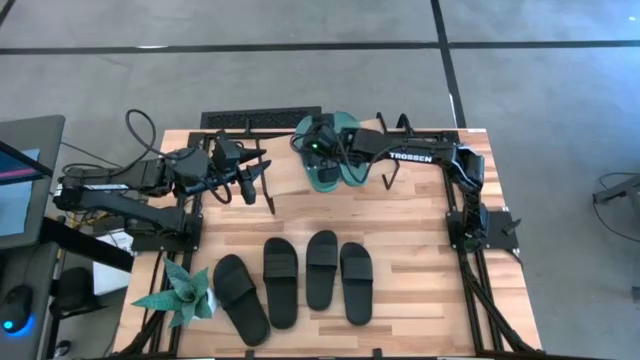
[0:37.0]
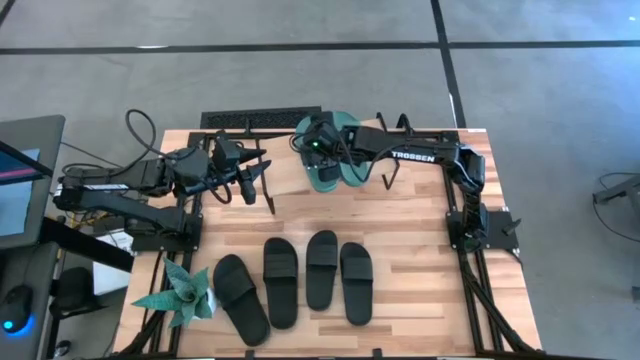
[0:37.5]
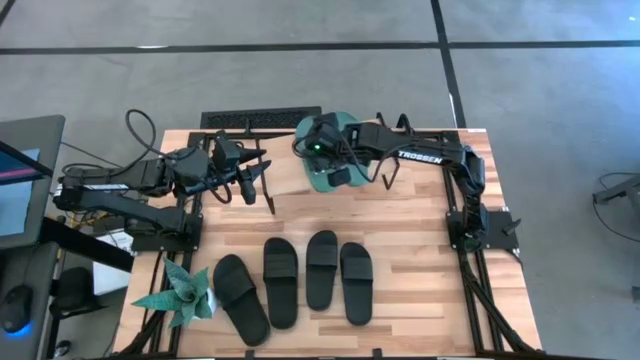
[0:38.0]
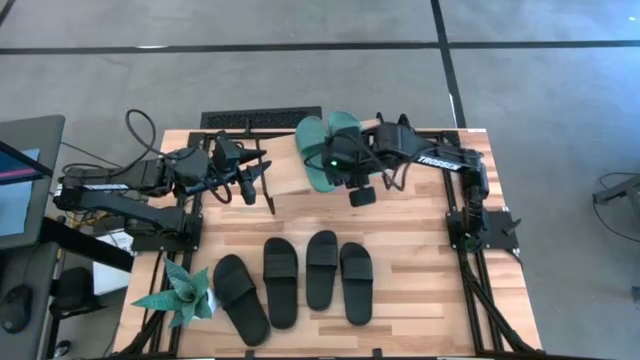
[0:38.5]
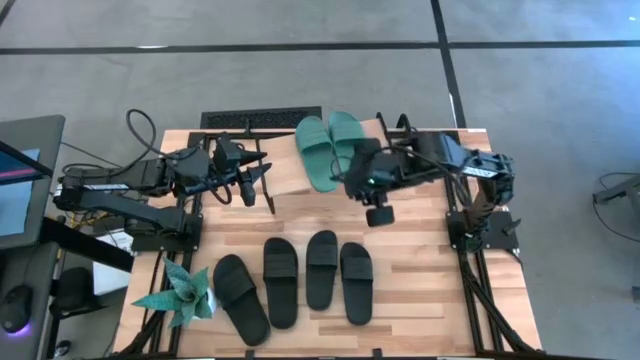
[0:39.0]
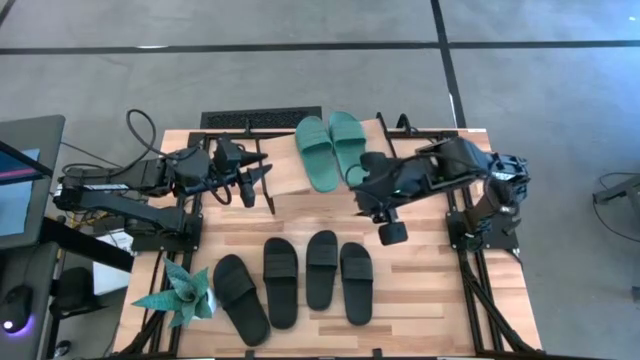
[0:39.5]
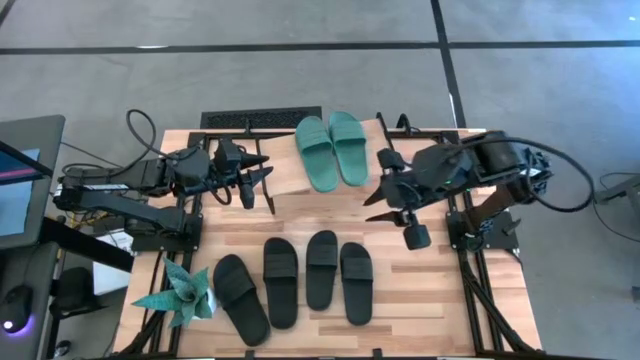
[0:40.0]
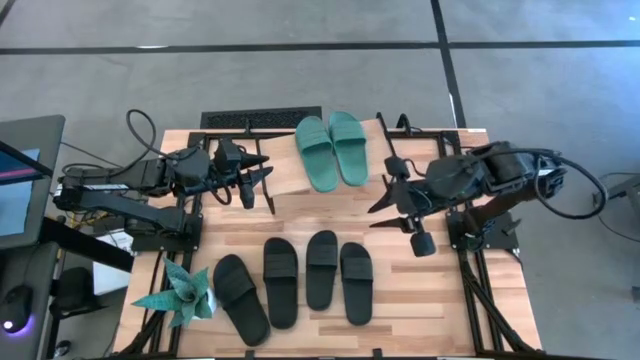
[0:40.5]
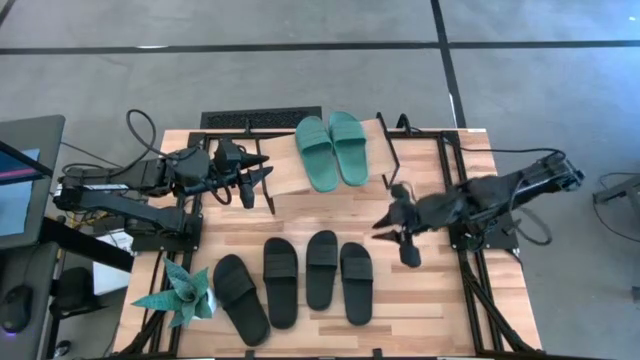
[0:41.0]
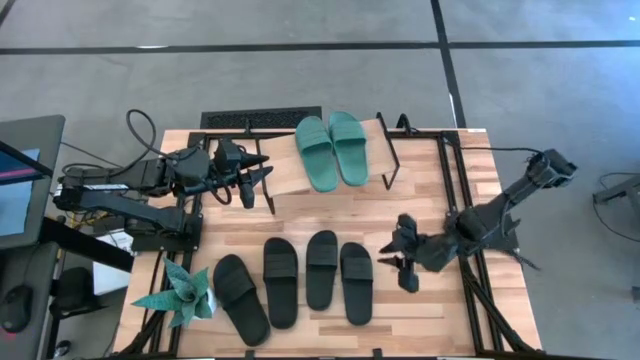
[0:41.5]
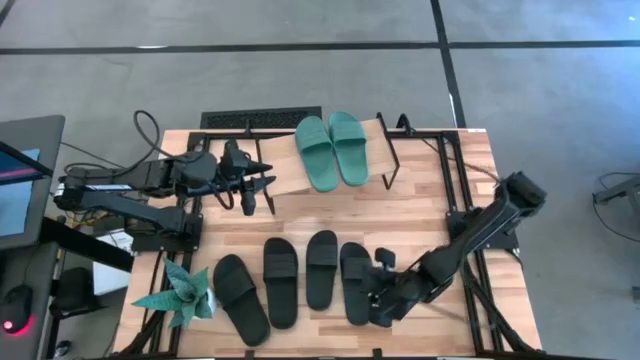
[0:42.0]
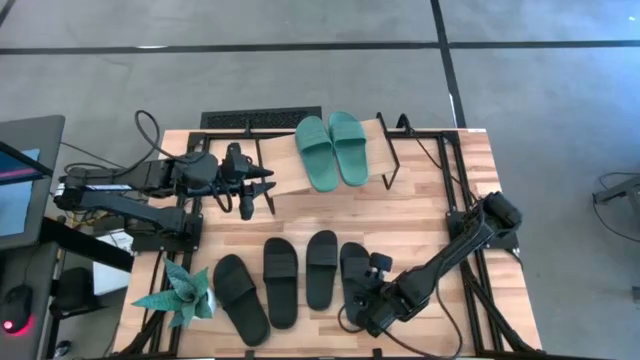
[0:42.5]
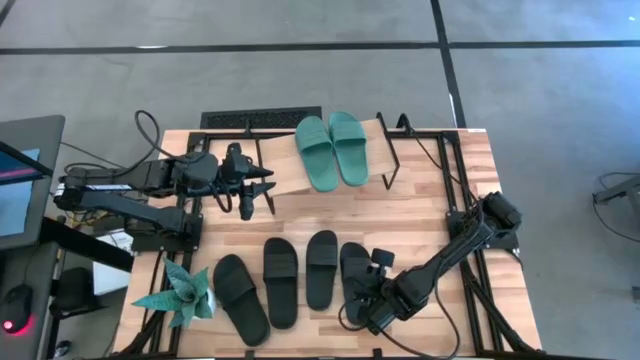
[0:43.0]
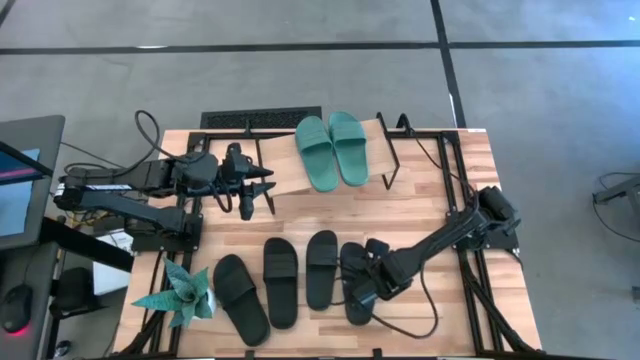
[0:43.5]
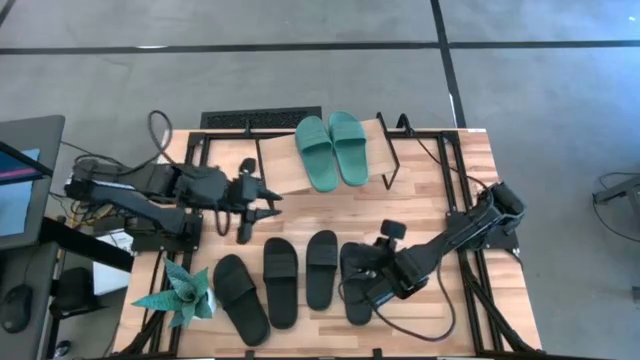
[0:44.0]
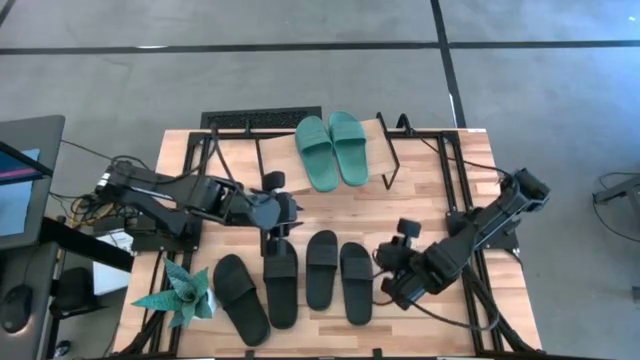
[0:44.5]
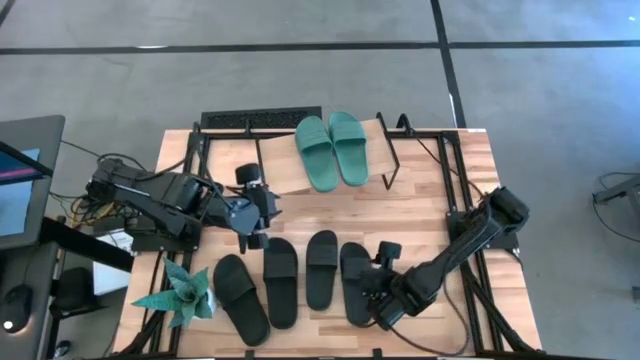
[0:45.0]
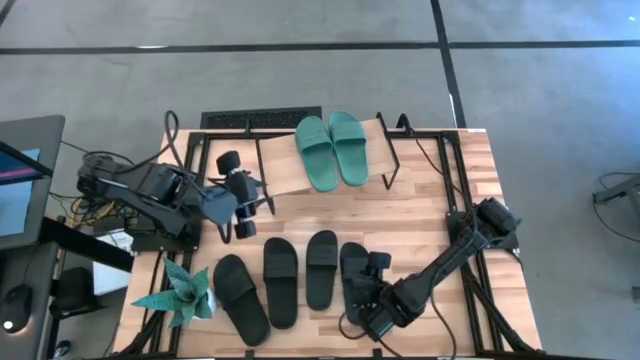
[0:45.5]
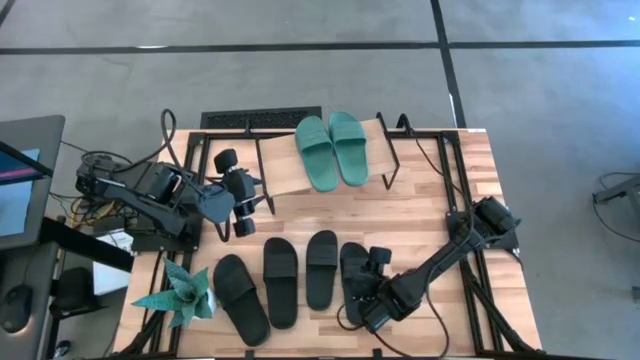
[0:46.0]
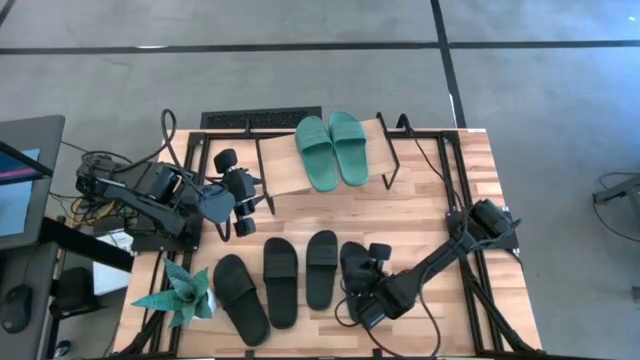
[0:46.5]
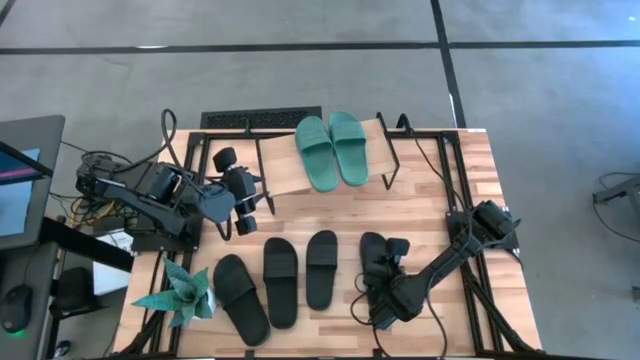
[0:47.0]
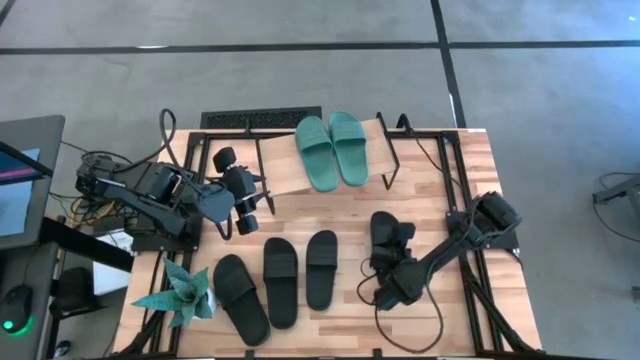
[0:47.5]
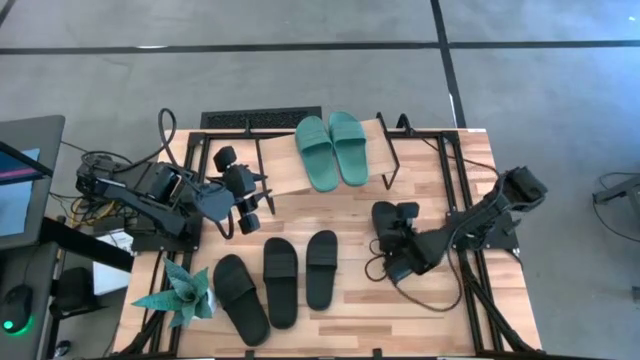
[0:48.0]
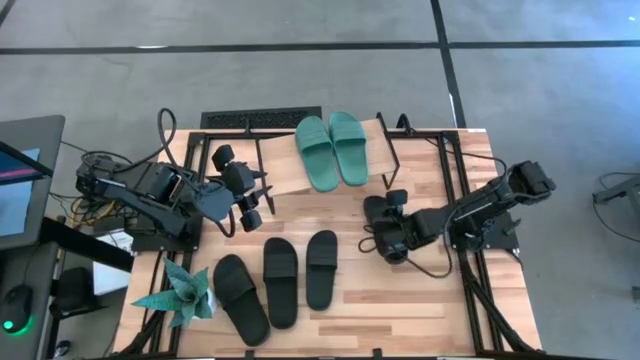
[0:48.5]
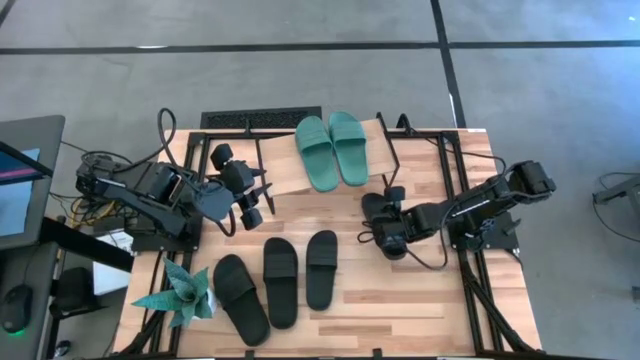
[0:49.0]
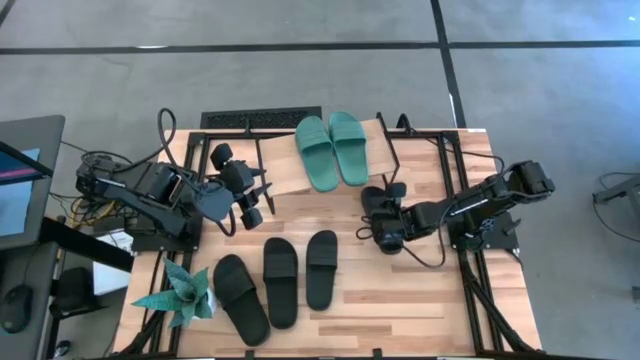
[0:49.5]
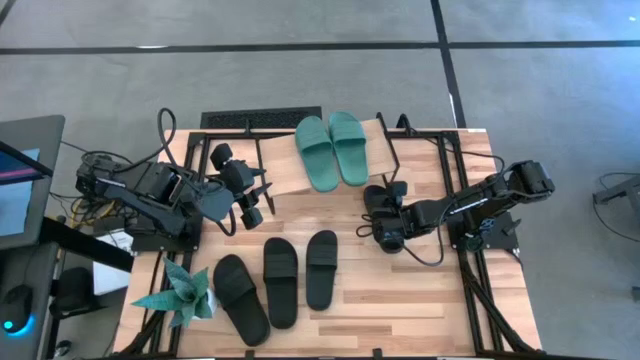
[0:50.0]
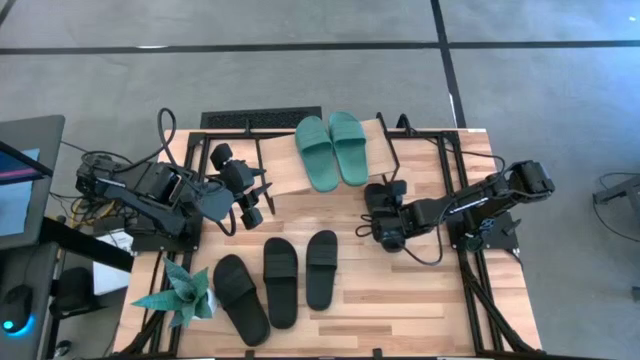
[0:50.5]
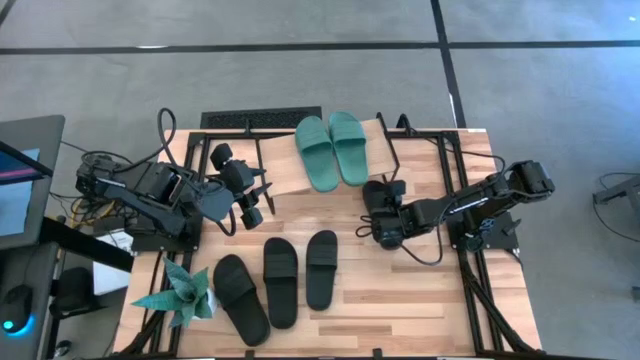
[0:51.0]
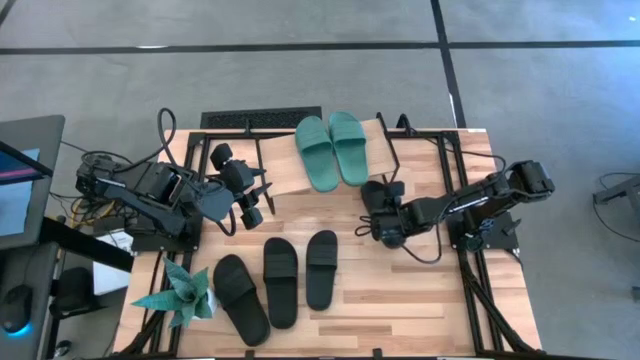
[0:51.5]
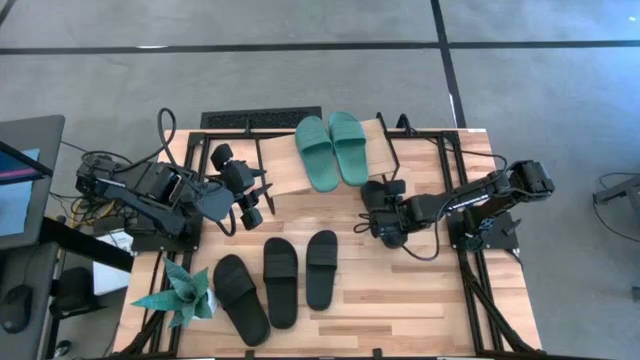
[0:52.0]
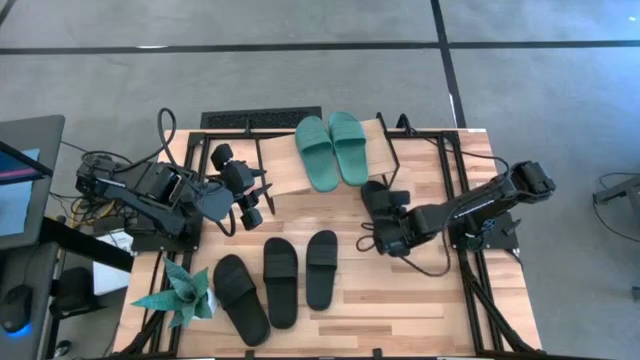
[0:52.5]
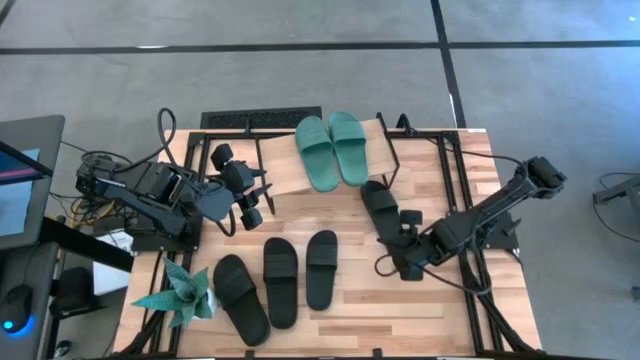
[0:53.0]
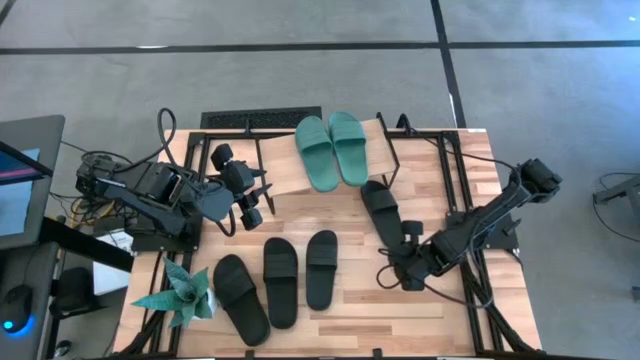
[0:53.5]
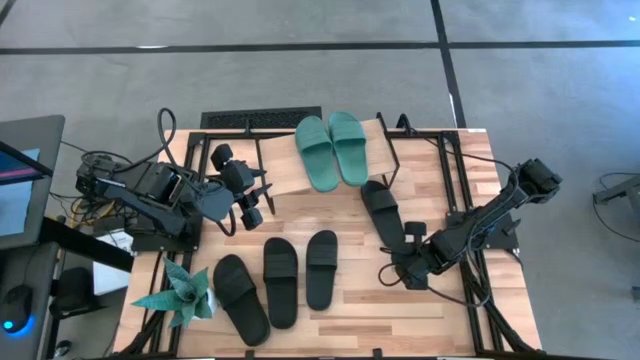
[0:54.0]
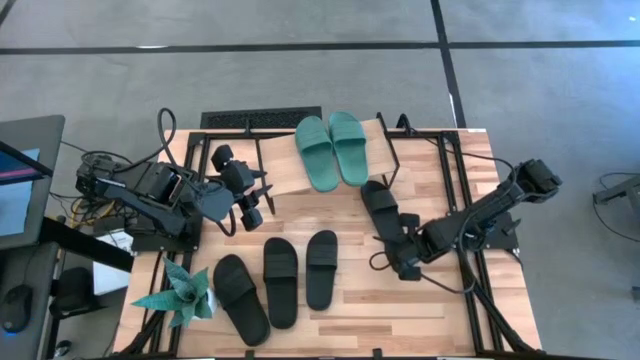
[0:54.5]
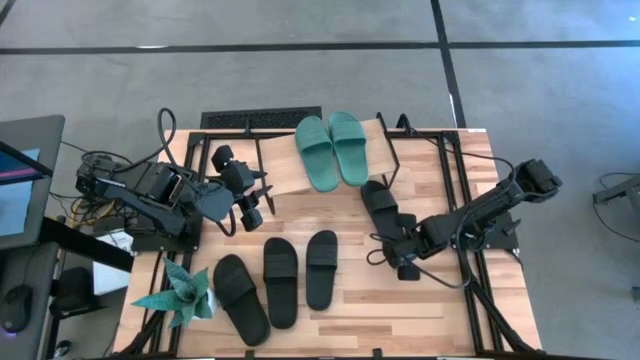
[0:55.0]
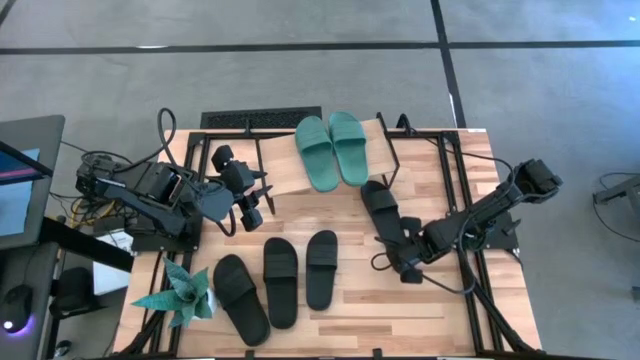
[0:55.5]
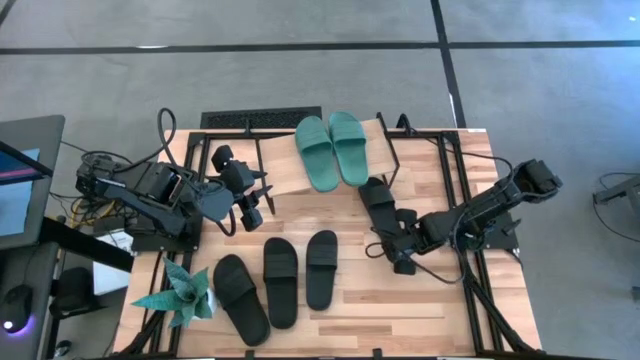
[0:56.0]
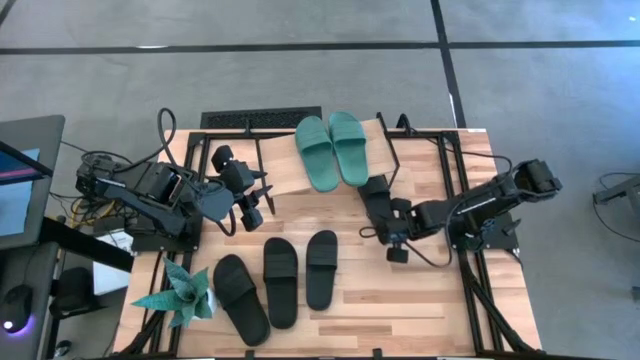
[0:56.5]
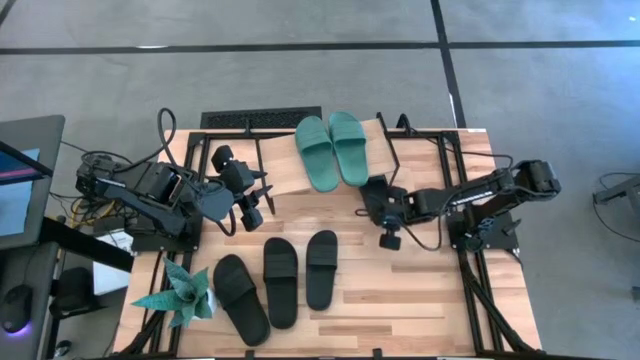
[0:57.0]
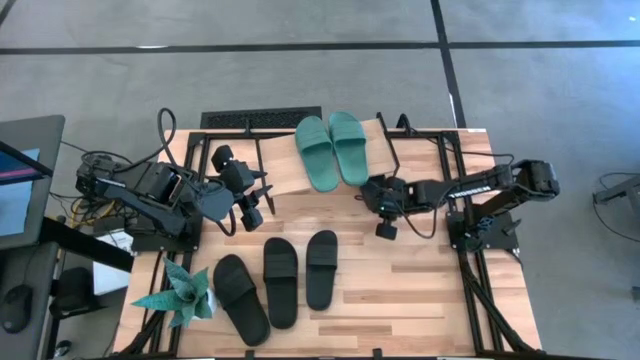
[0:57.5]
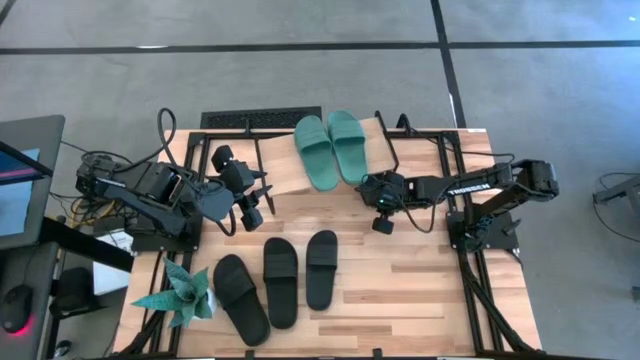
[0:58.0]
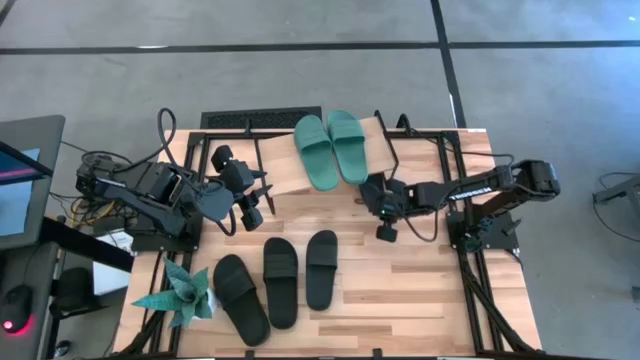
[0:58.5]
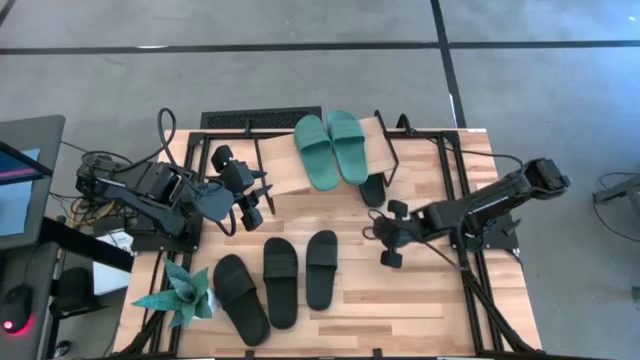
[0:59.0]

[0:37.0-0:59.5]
Task: Pick and place slides into the shelf
Put the black slide under the shelf
